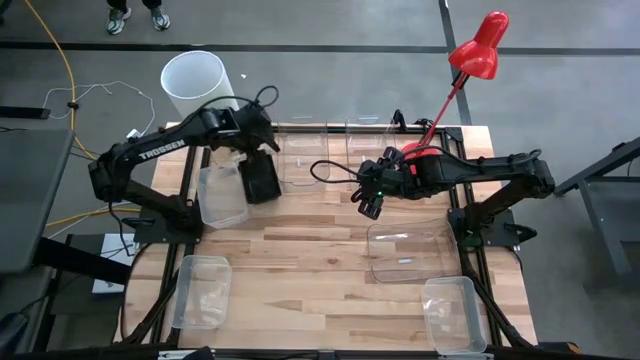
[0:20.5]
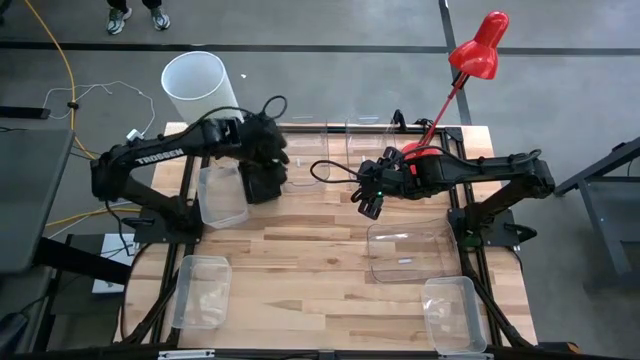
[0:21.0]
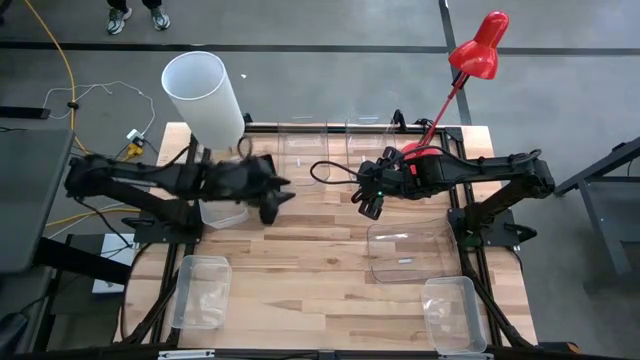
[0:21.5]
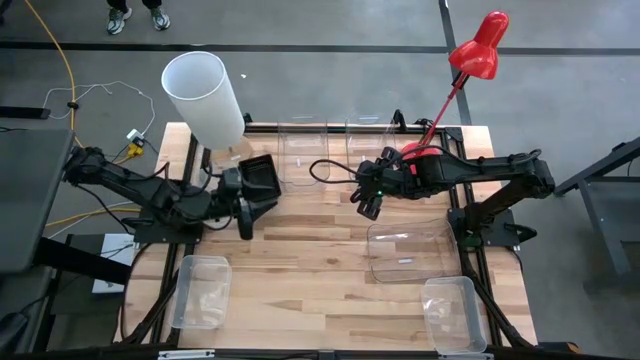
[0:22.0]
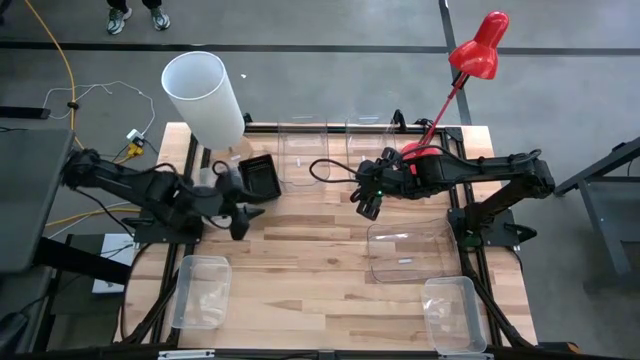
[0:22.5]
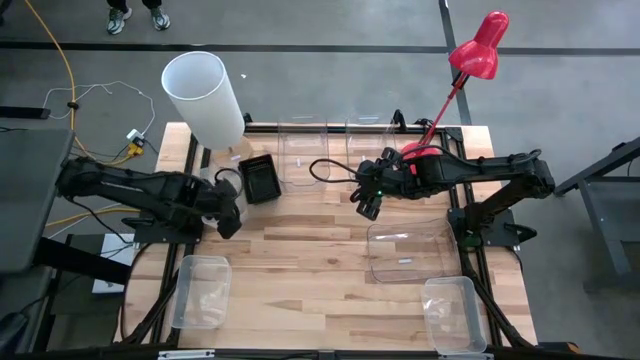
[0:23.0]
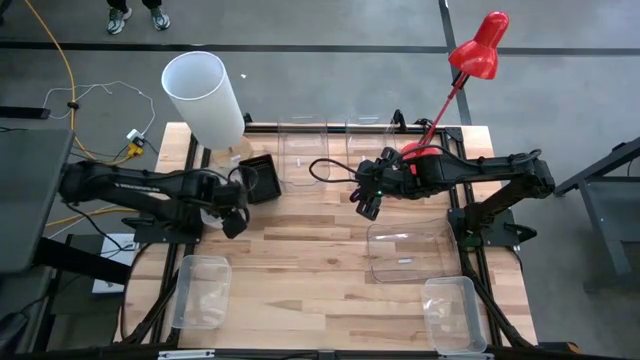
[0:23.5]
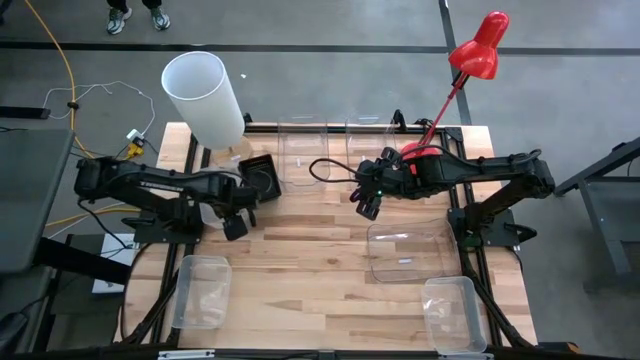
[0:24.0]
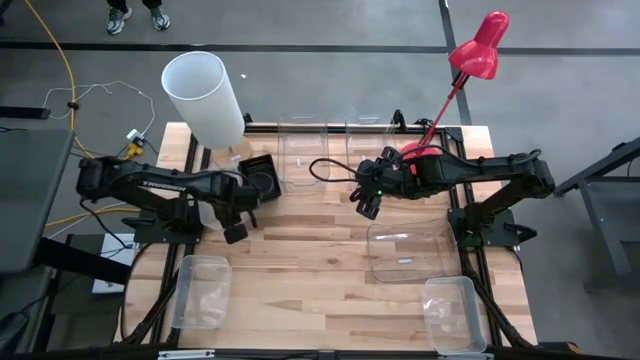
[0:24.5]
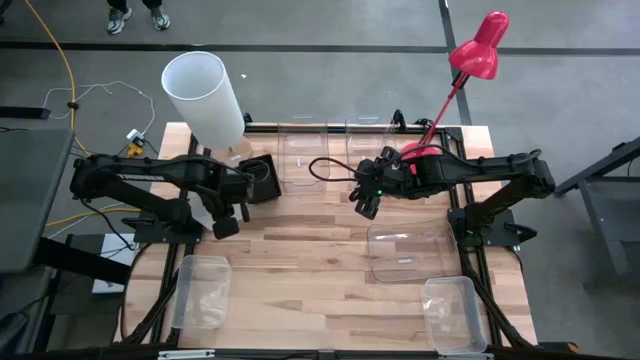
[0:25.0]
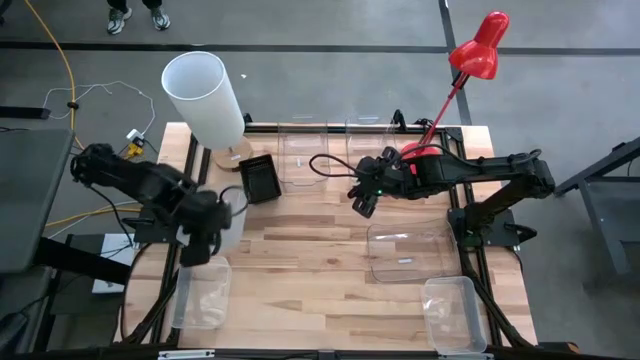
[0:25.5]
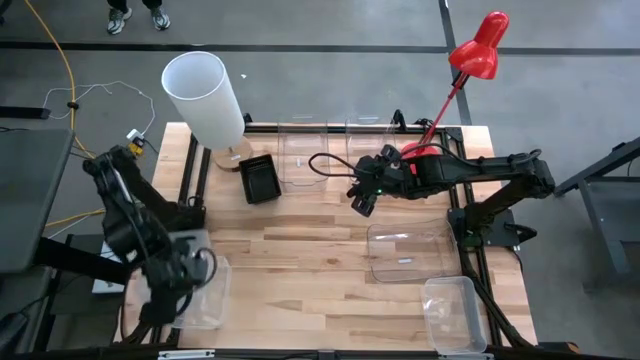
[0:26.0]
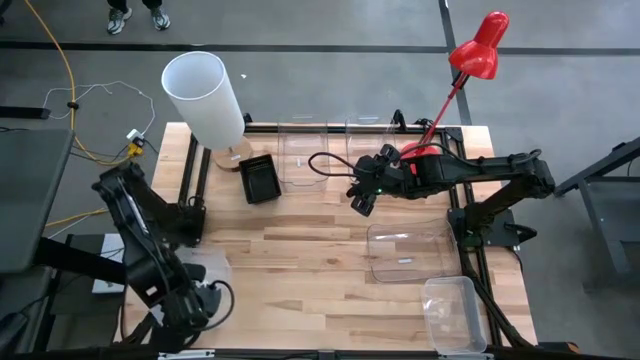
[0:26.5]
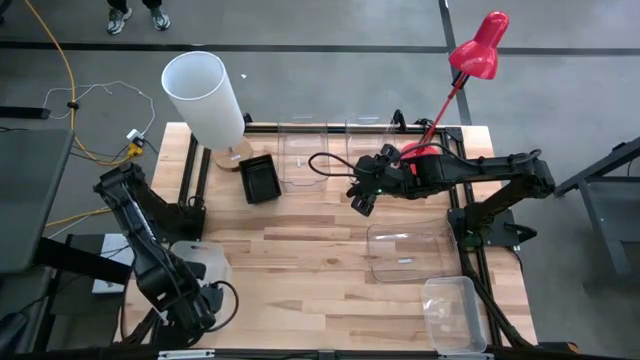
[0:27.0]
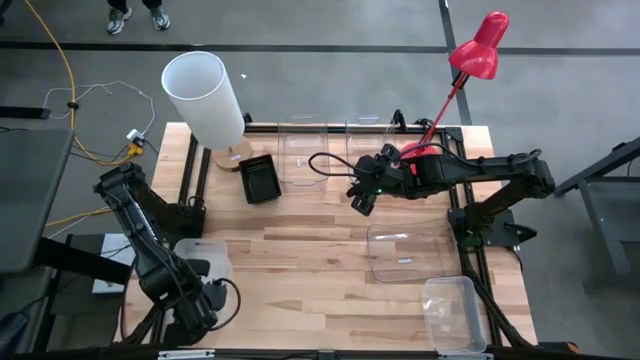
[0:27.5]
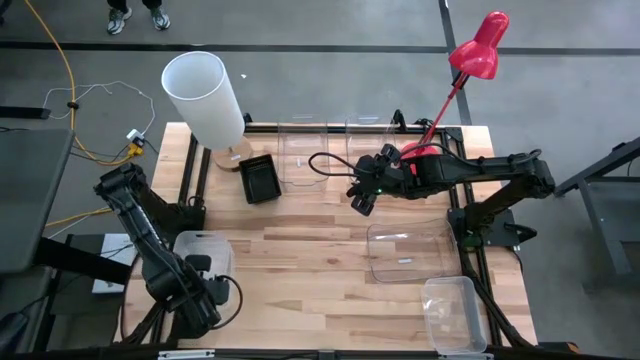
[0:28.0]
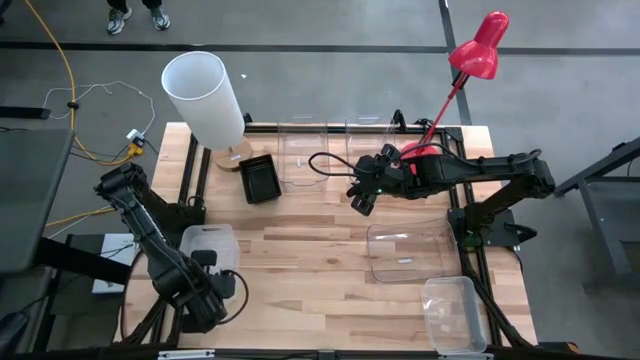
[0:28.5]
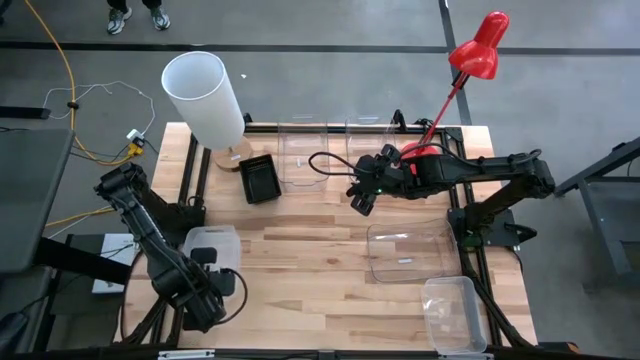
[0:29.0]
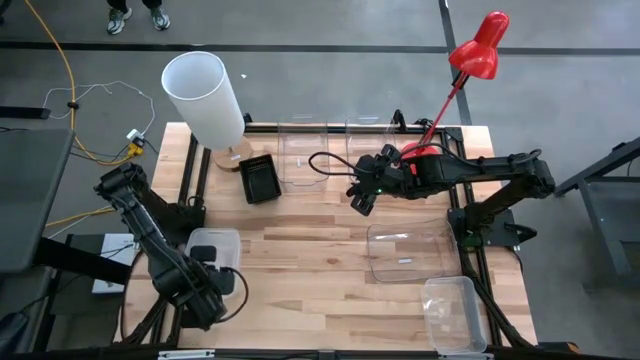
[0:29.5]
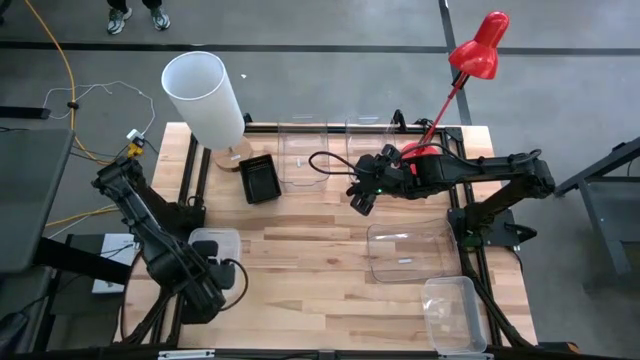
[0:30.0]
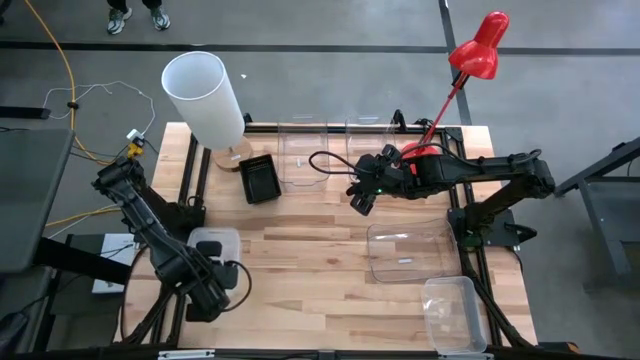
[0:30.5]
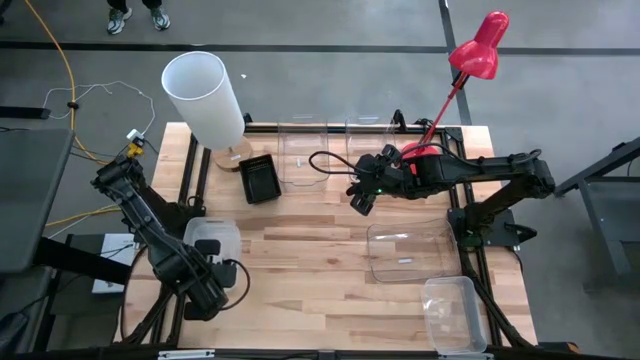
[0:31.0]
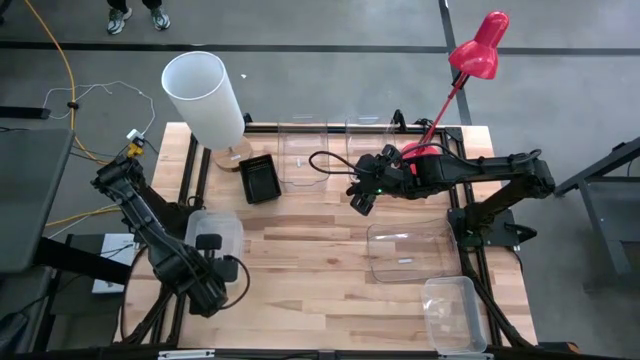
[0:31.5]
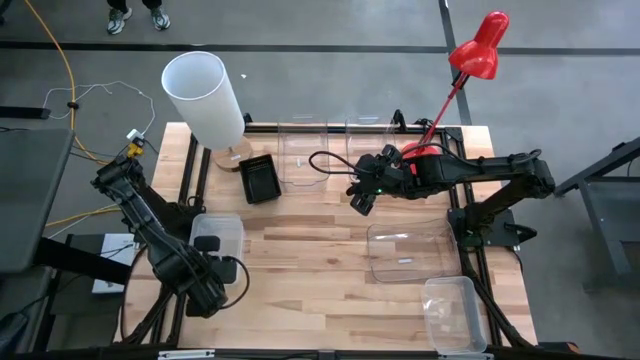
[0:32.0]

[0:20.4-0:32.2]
Stack the top white bin on the bottom left white bin
